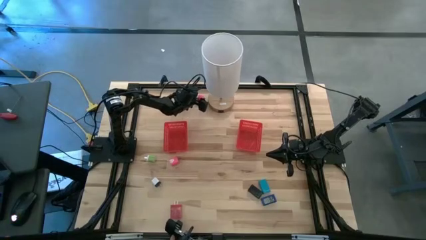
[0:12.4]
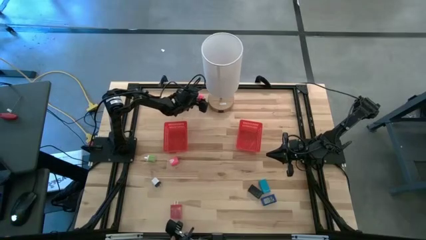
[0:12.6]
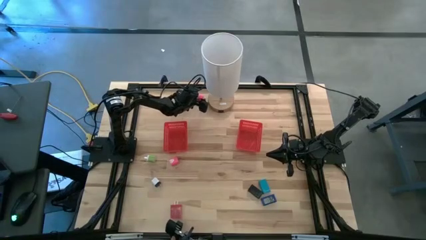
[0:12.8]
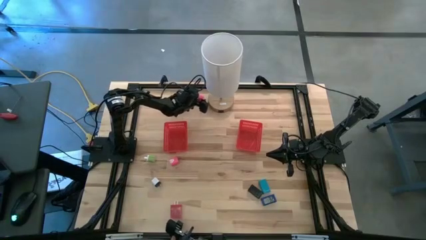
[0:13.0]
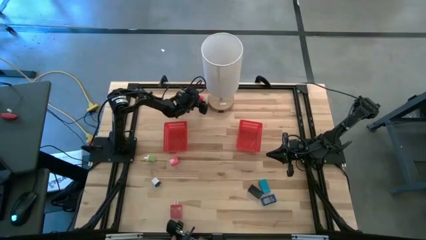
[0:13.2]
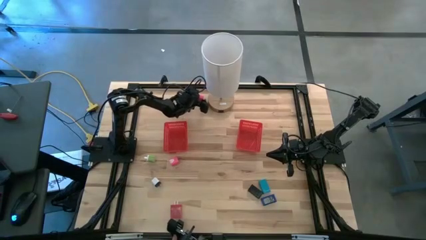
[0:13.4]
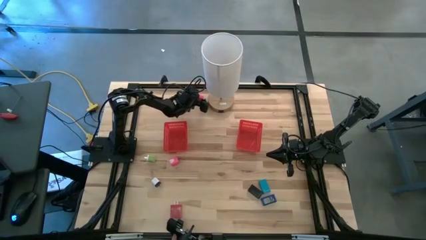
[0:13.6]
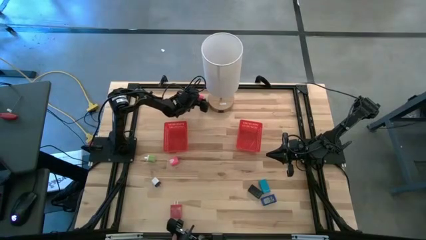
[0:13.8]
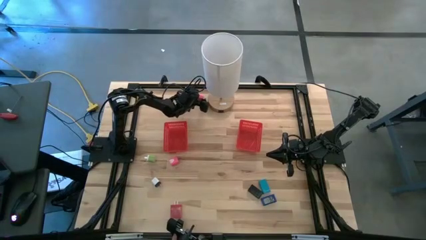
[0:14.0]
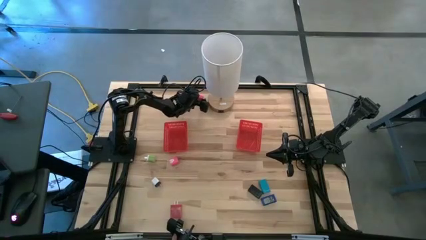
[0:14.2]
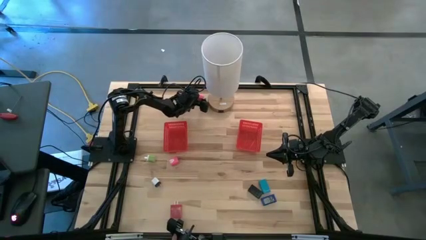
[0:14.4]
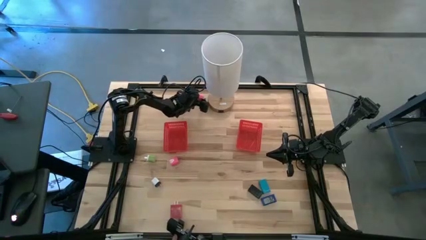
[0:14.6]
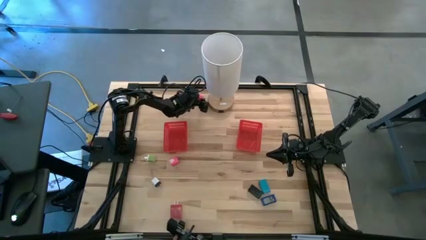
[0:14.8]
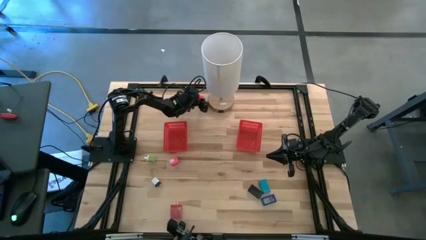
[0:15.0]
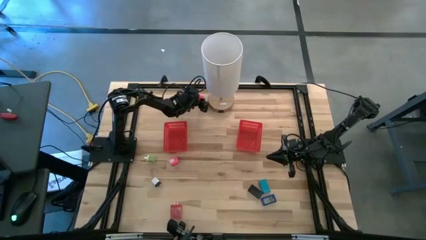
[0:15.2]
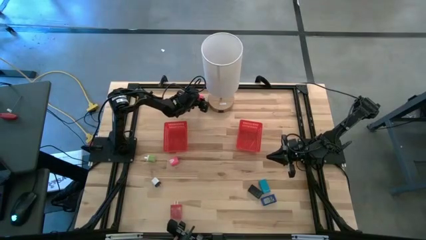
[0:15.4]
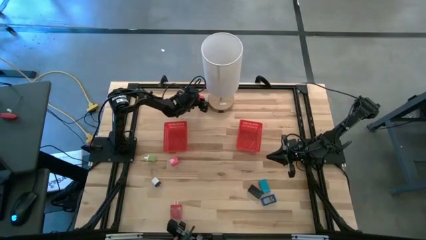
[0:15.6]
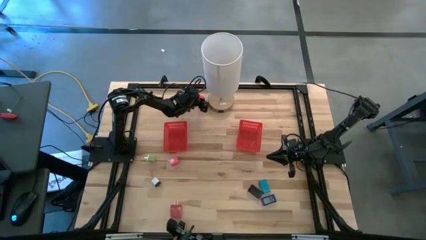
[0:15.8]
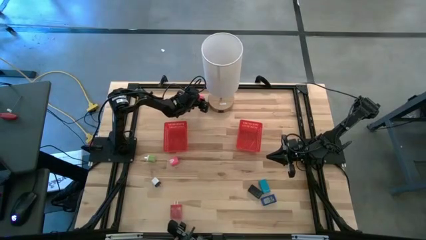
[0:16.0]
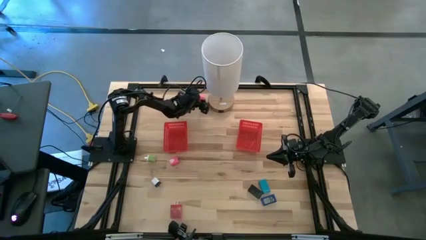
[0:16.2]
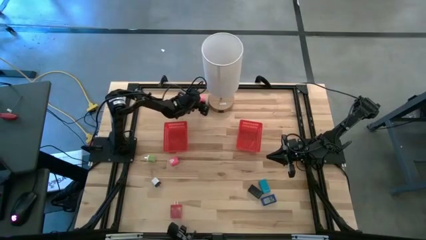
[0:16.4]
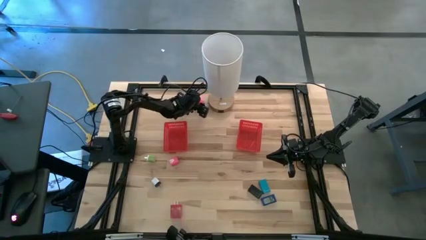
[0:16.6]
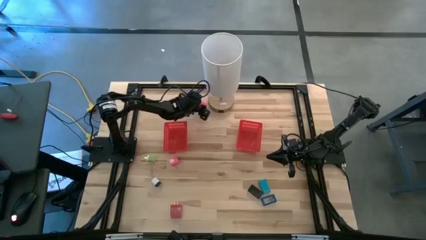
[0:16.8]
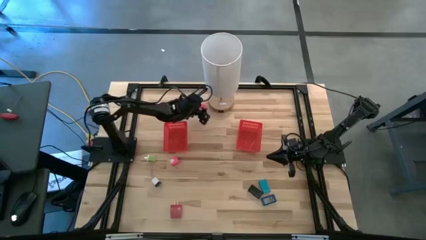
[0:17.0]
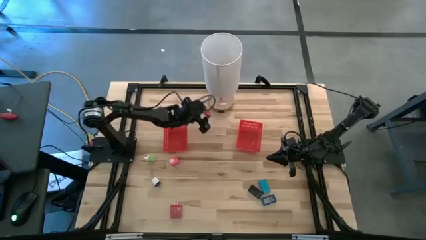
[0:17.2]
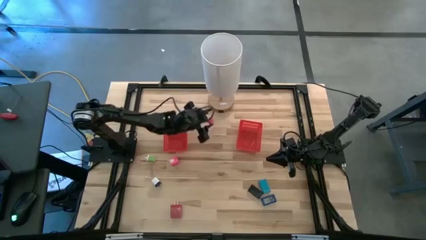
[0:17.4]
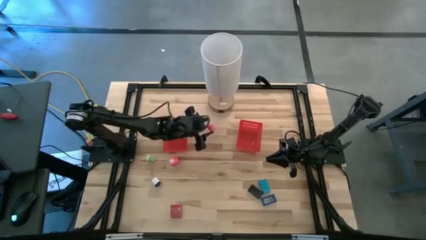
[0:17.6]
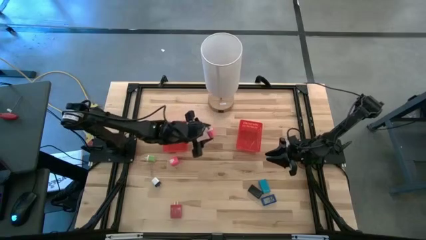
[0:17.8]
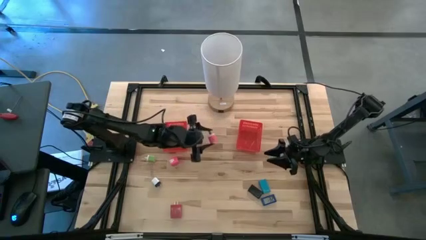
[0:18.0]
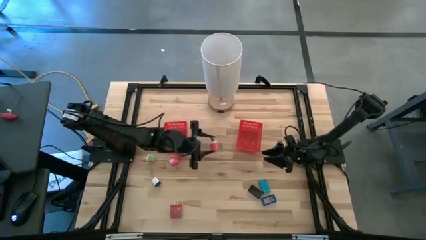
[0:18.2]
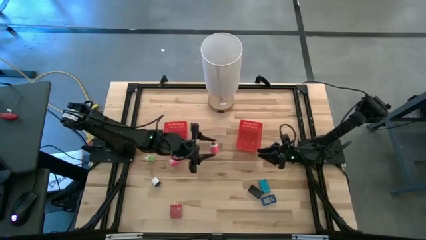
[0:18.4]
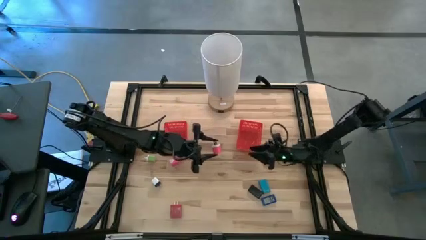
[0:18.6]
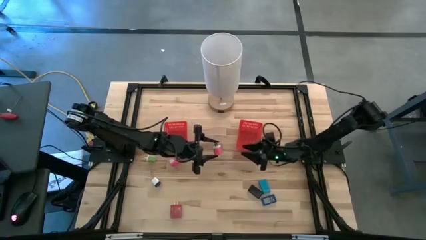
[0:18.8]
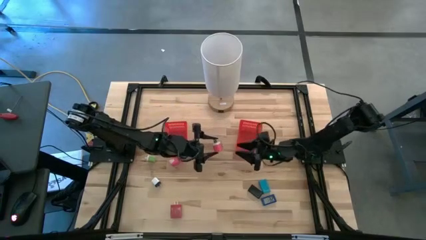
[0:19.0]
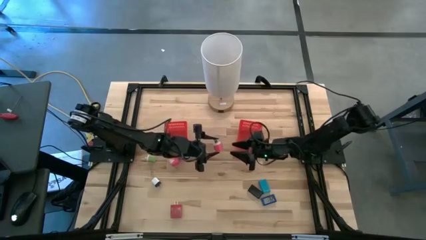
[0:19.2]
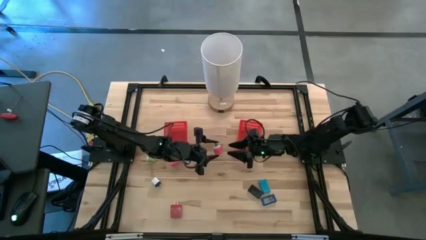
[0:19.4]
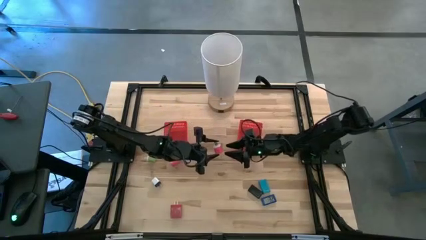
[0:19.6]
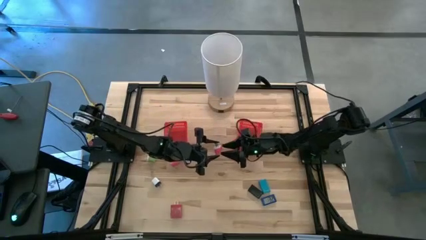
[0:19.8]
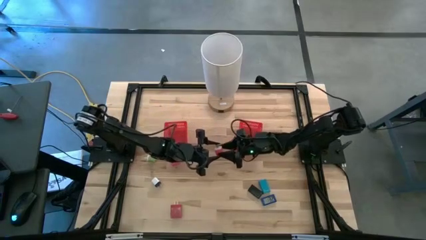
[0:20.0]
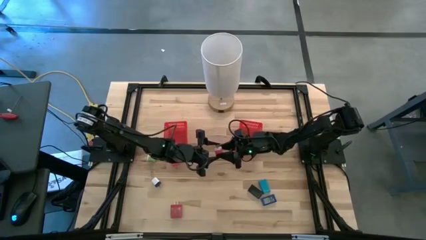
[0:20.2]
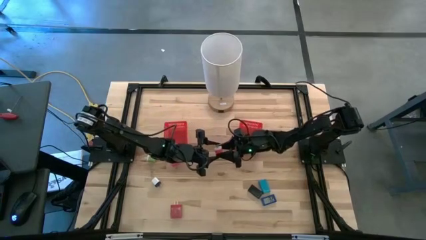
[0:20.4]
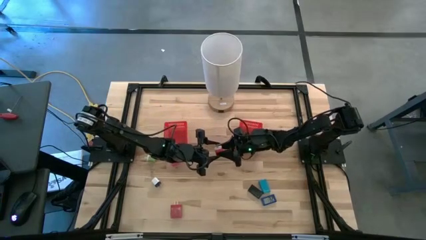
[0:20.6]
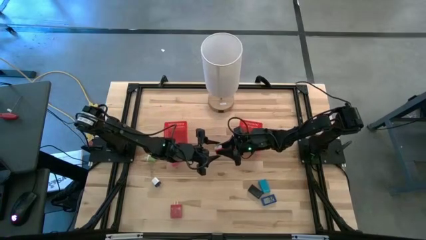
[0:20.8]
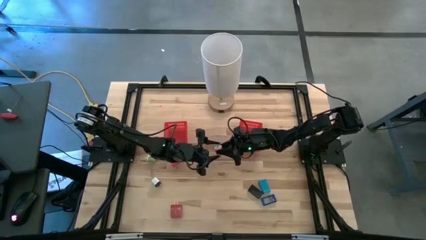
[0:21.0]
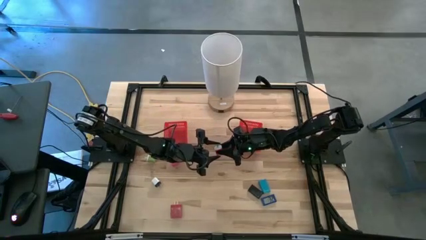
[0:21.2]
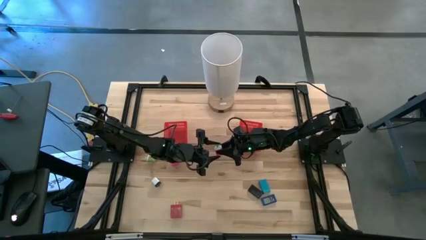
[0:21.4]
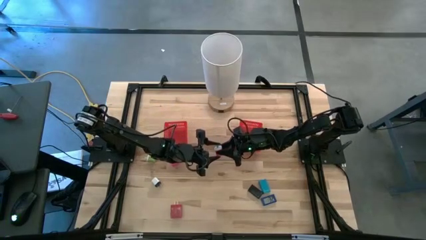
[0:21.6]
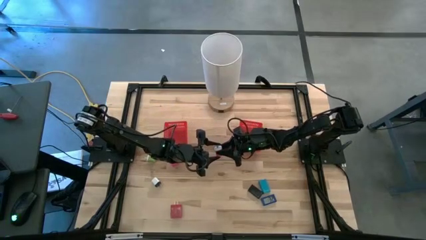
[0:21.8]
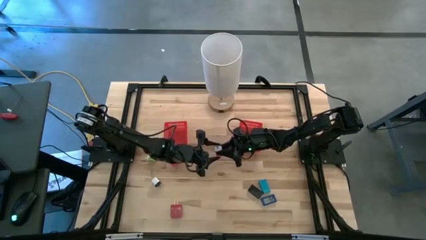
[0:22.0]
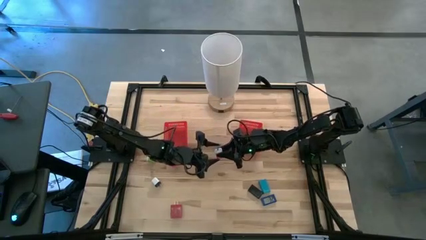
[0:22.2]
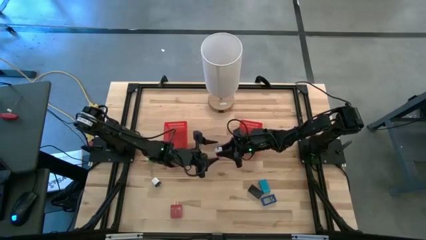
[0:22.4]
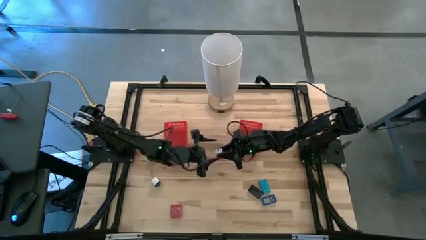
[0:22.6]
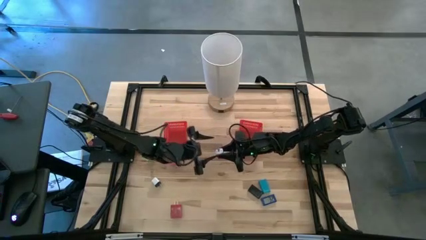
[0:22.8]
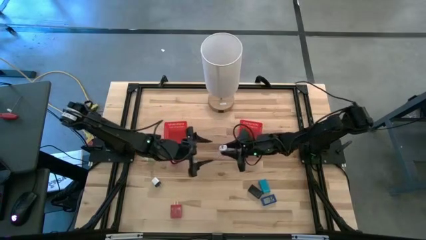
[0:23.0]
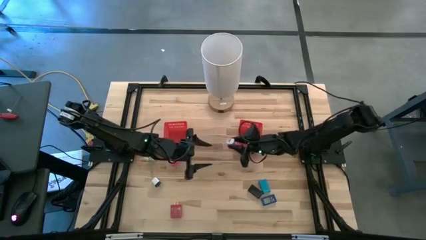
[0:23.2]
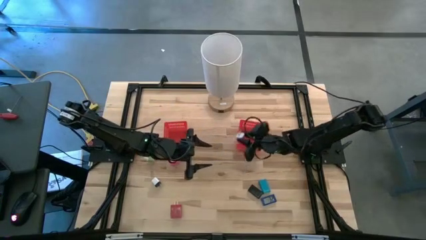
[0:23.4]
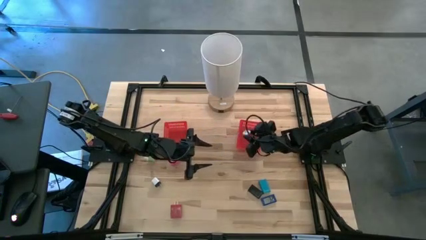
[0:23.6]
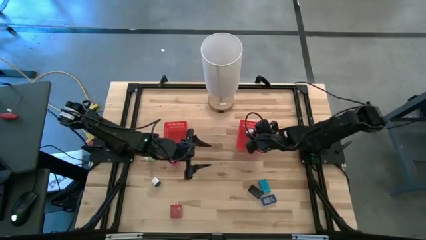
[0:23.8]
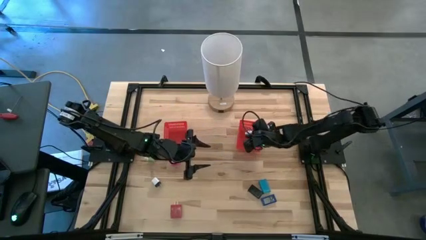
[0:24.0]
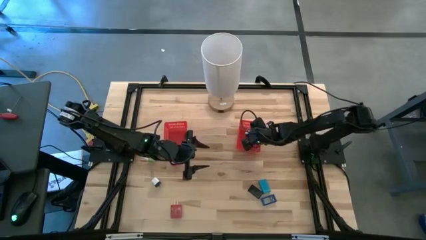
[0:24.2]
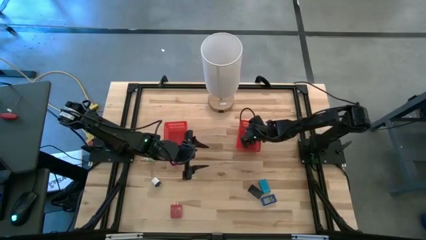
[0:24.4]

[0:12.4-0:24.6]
Task: Pick & Place Office items
Put the top pink charger adapter into the right red bin
